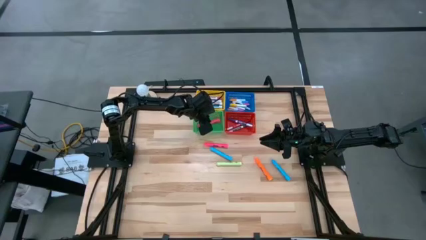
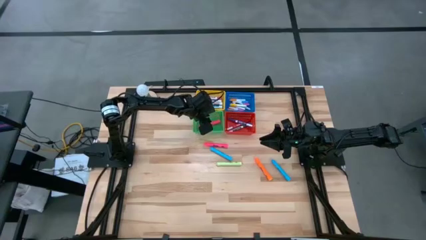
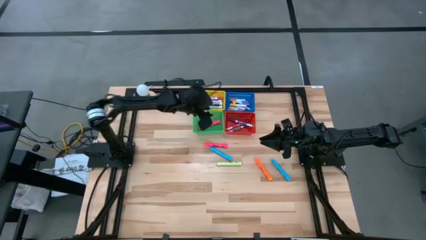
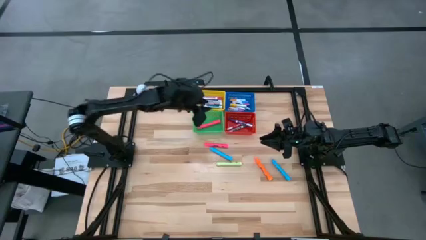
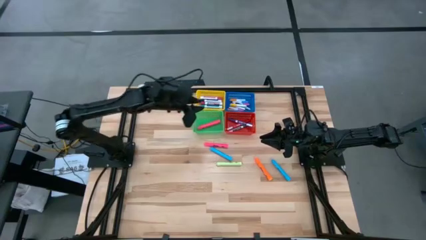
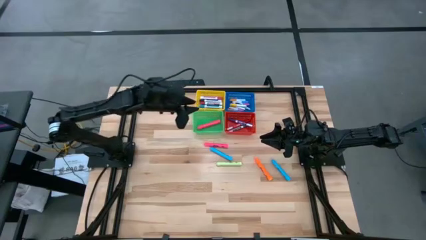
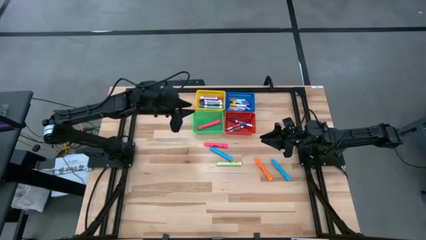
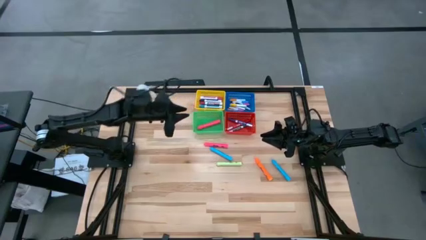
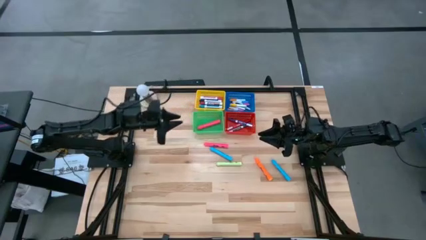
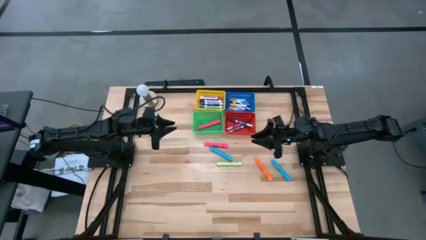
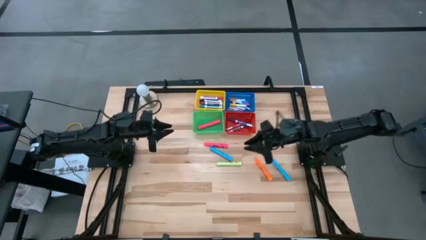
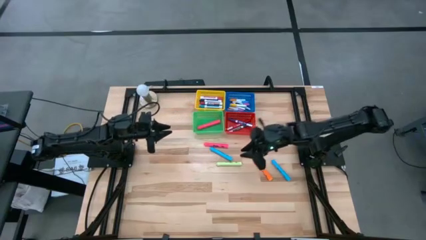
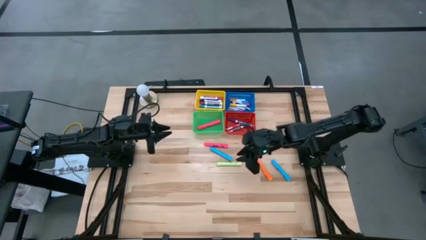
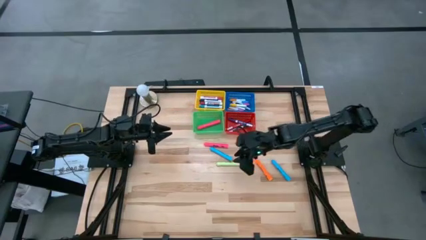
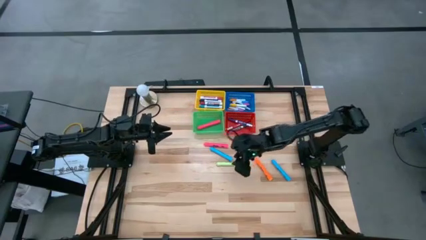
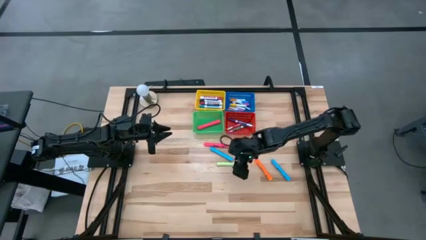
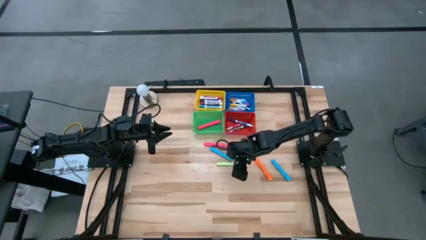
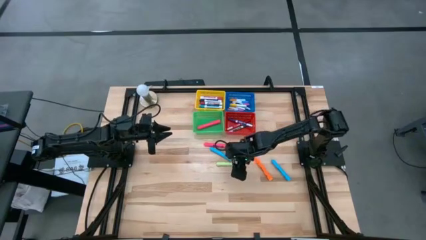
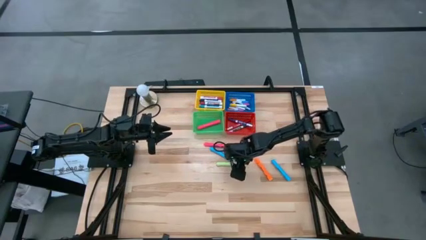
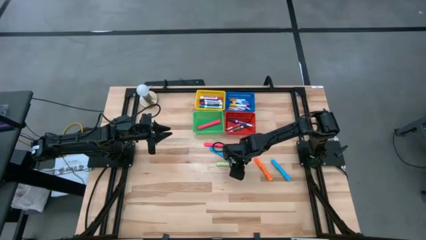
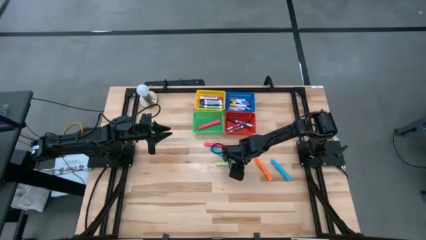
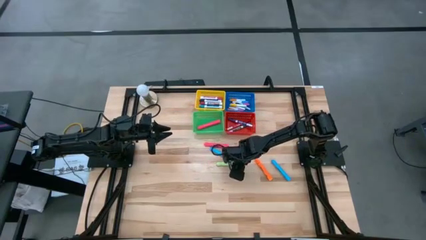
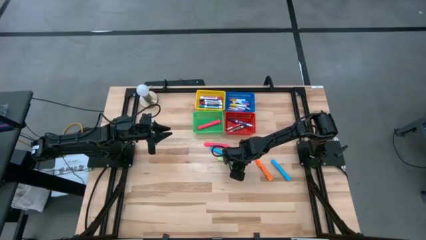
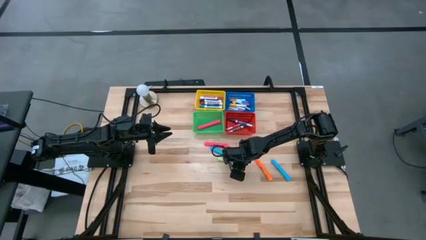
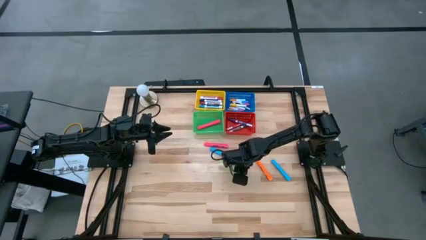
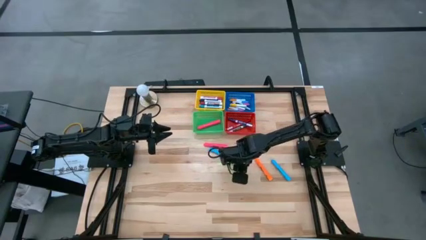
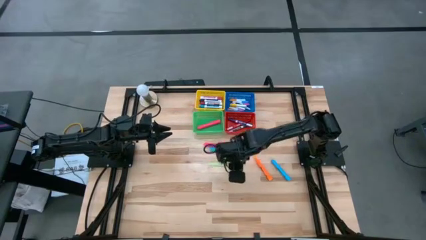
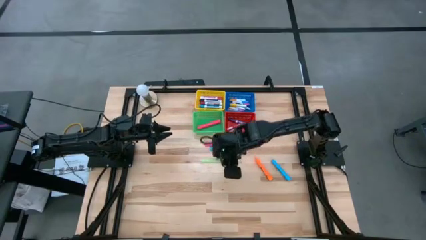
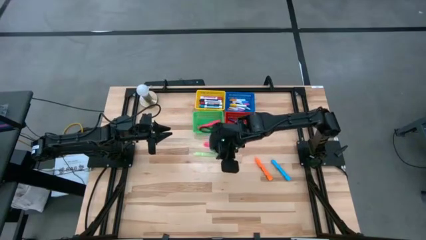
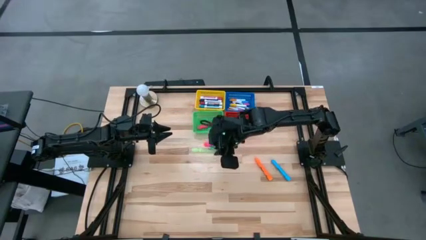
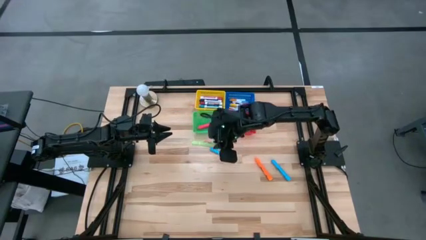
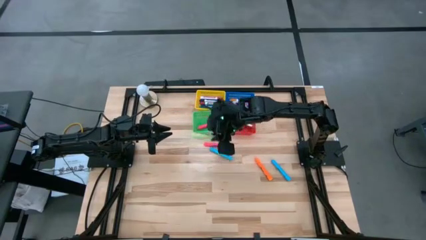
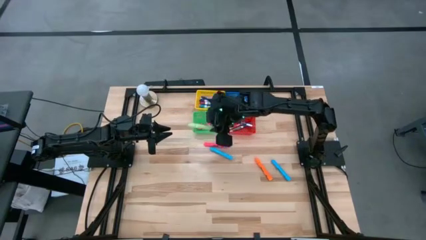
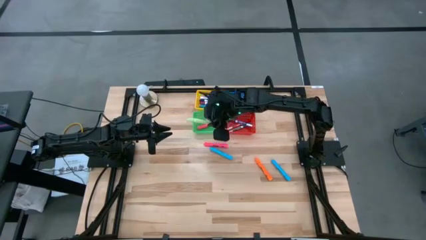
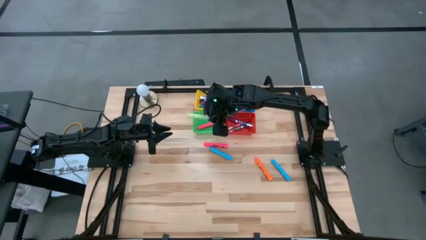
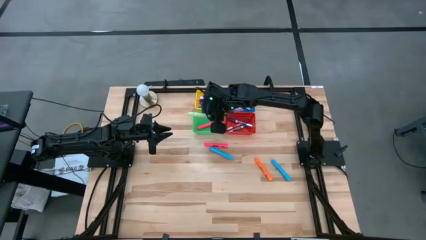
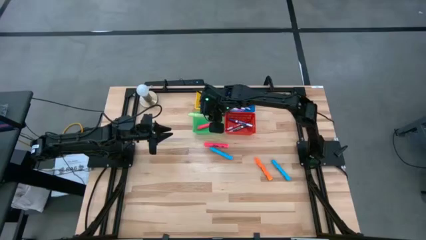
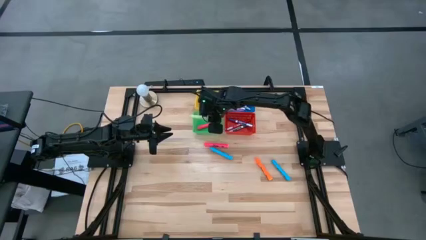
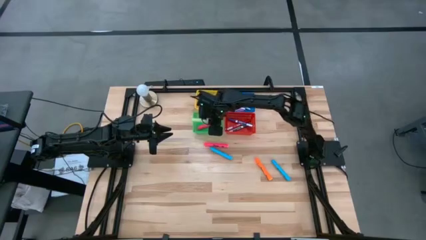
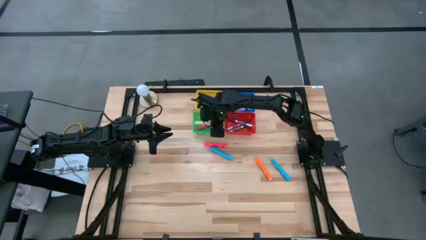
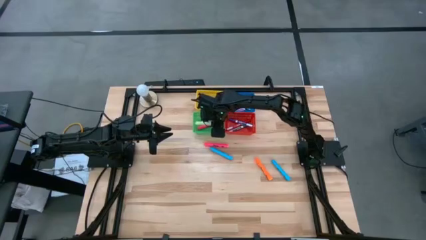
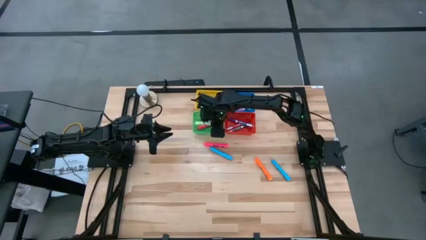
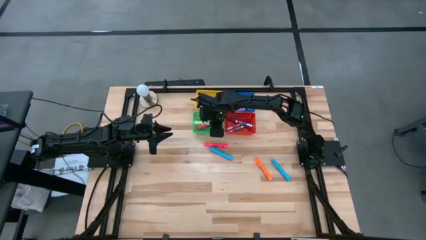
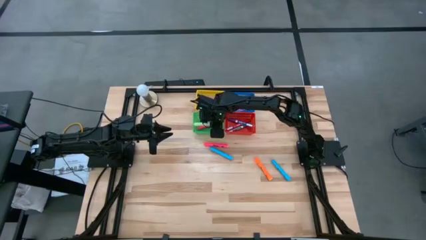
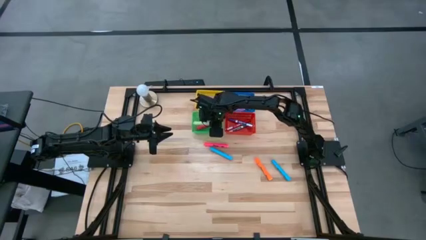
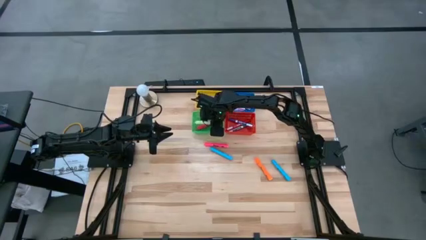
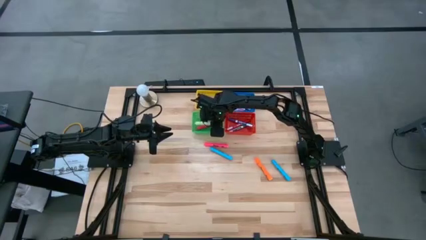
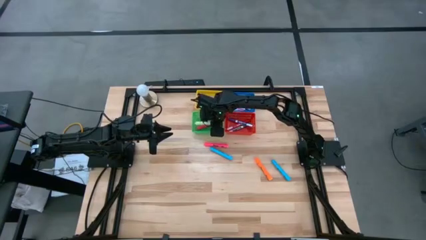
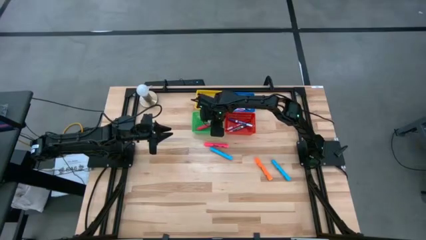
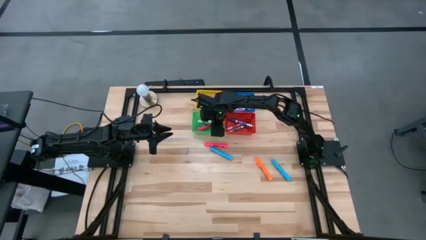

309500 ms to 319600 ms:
Task: Pick & Place Markers
Put the large green highlighter pen into the green bin

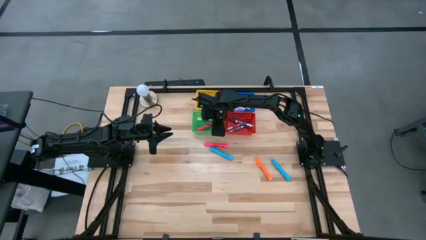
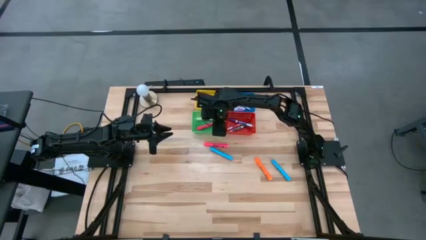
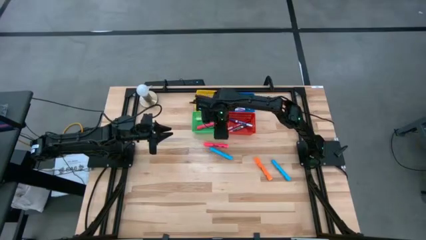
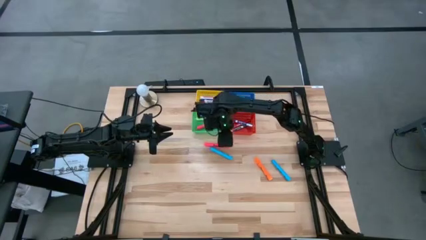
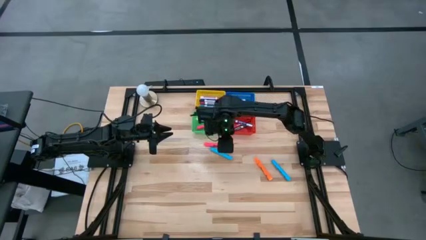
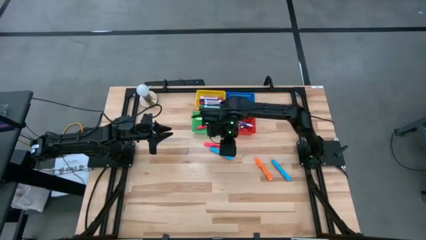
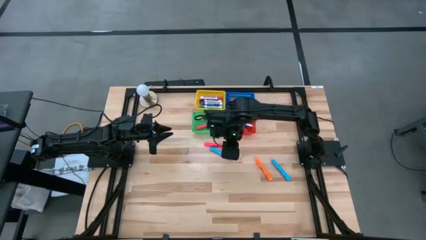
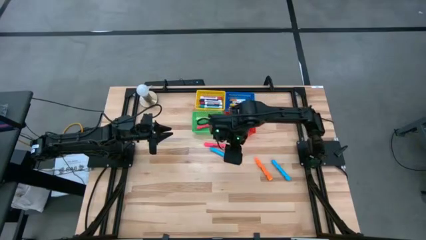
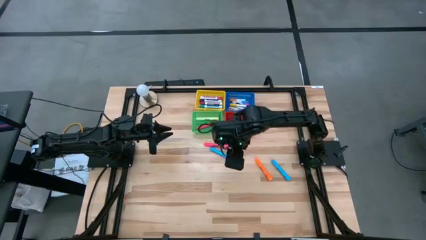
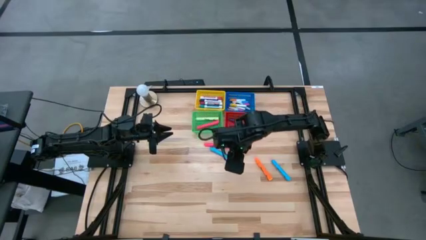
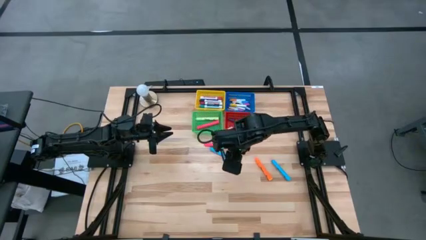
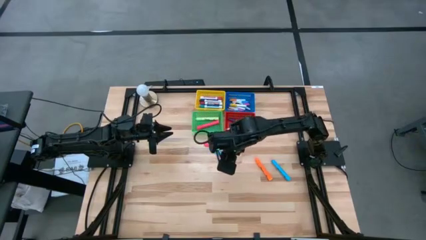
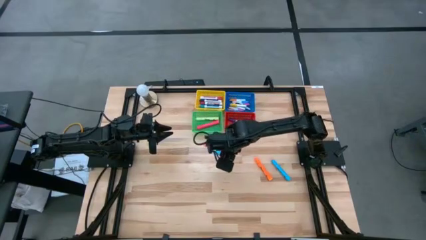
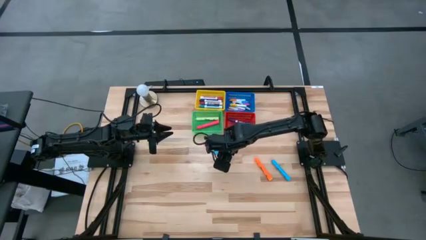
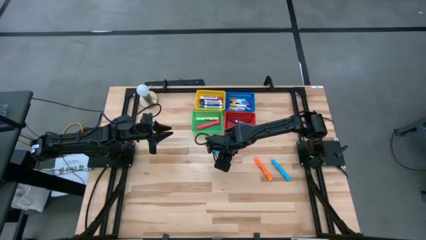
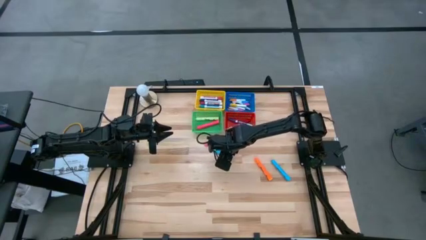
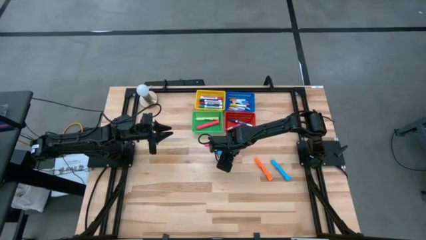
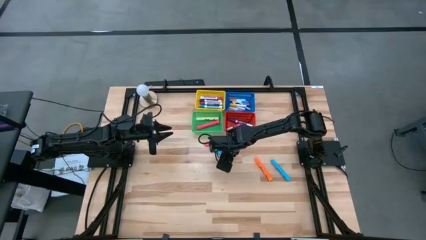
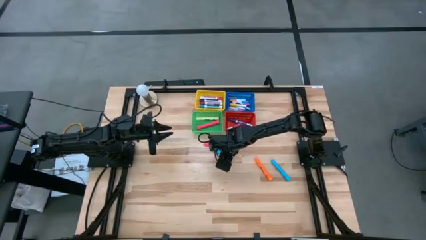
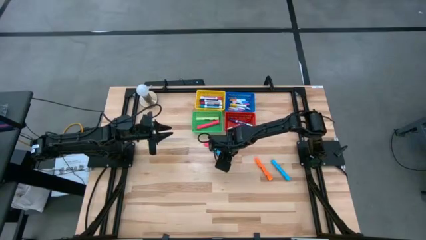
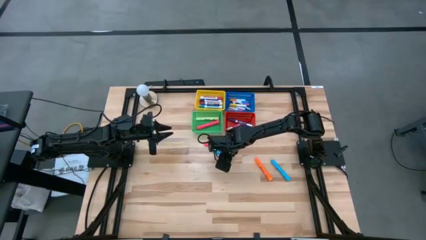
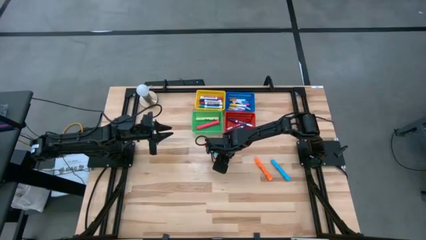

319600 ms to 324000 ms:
Put the top large blue highlighter pen into the green bin
